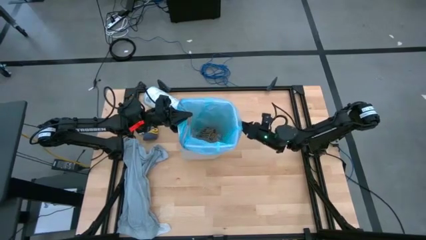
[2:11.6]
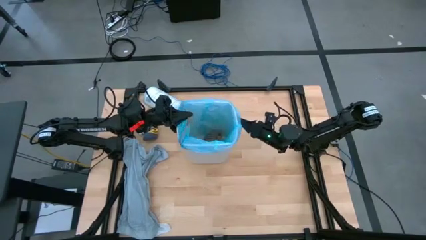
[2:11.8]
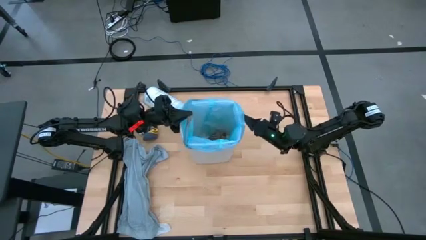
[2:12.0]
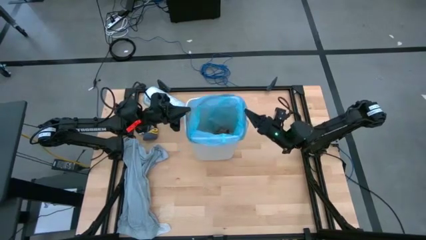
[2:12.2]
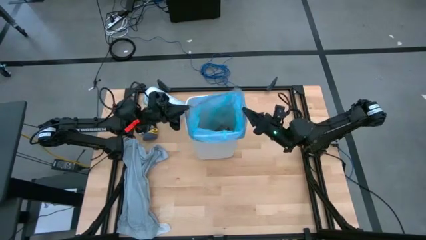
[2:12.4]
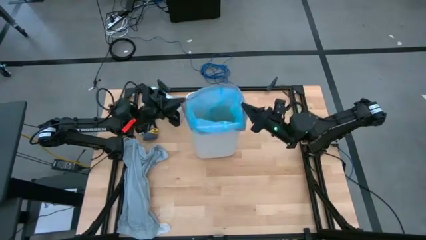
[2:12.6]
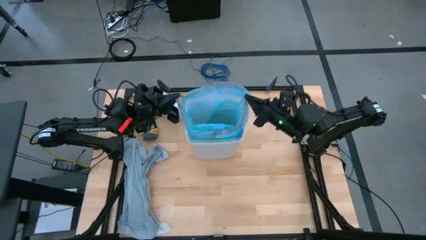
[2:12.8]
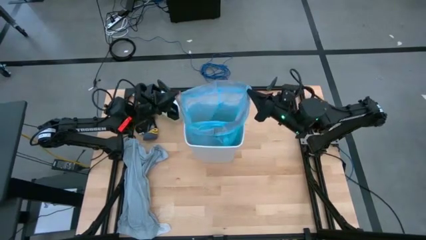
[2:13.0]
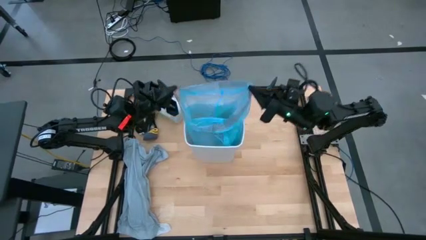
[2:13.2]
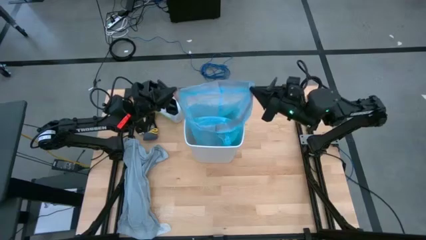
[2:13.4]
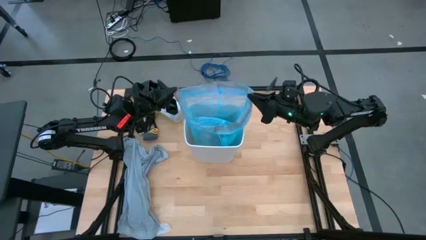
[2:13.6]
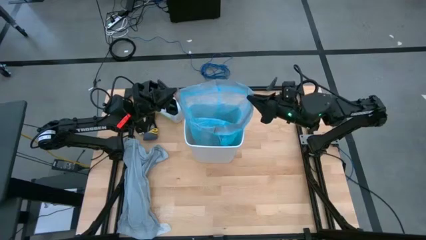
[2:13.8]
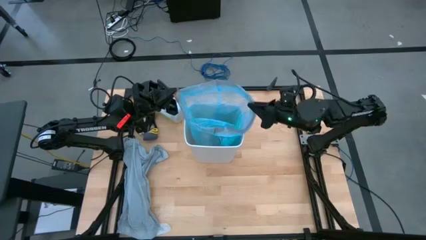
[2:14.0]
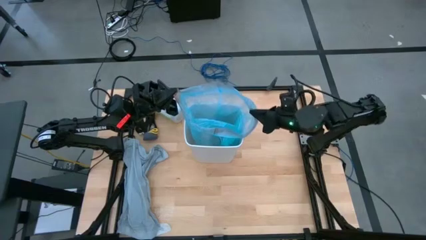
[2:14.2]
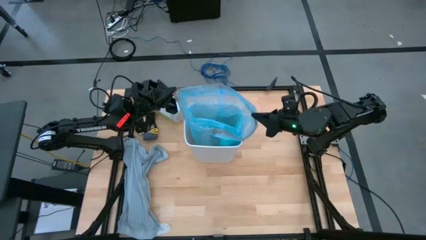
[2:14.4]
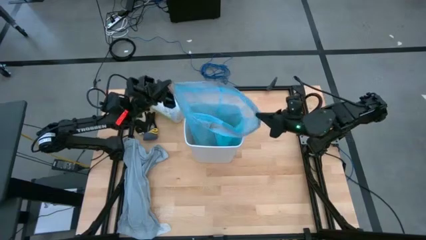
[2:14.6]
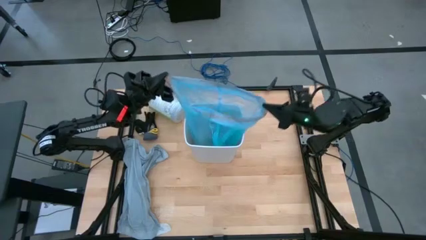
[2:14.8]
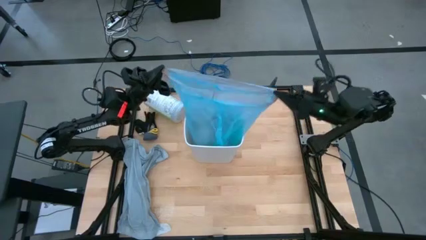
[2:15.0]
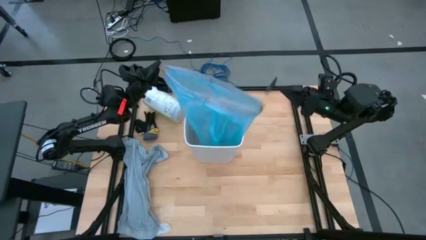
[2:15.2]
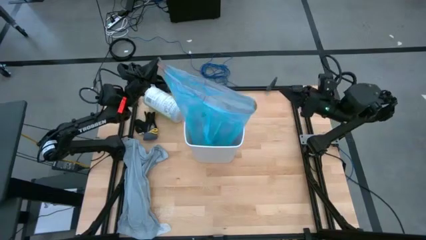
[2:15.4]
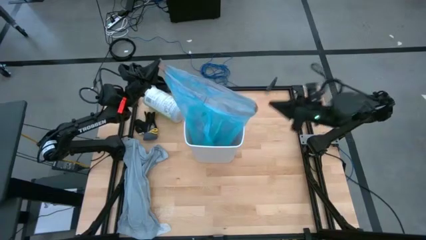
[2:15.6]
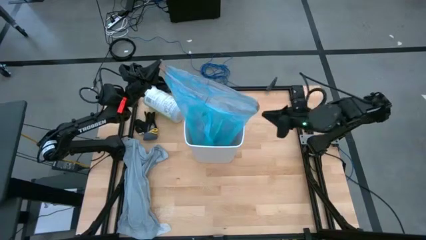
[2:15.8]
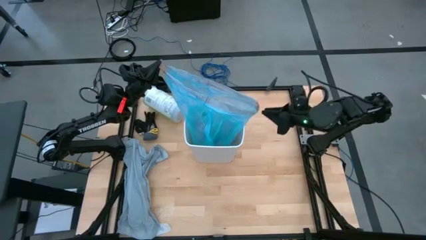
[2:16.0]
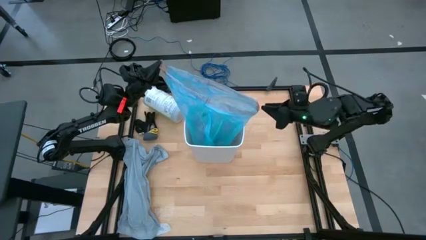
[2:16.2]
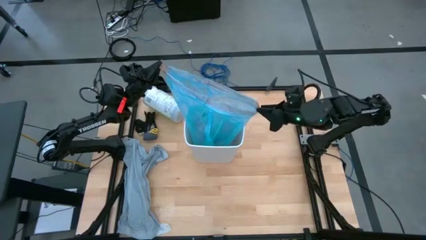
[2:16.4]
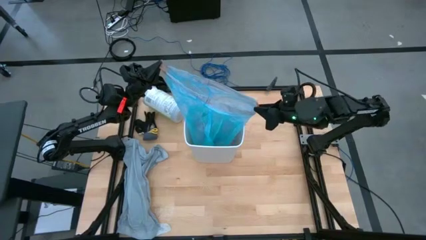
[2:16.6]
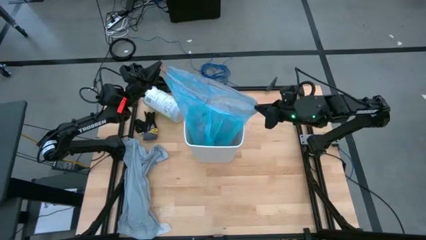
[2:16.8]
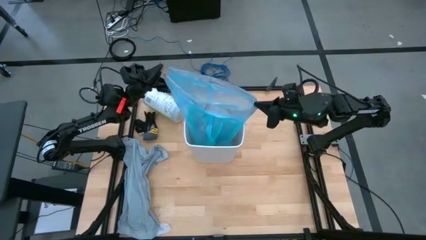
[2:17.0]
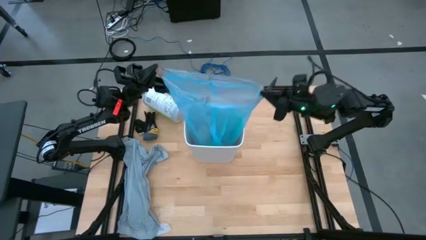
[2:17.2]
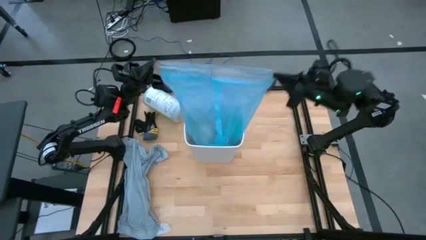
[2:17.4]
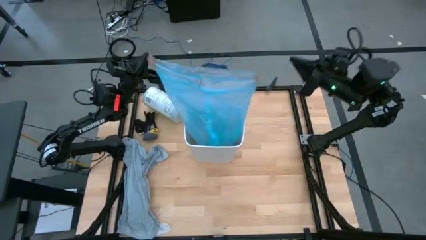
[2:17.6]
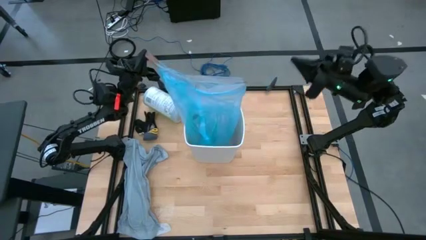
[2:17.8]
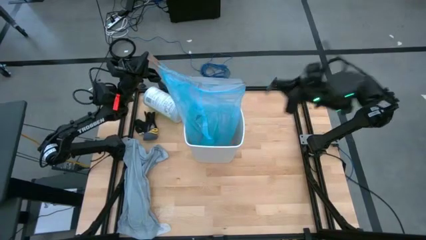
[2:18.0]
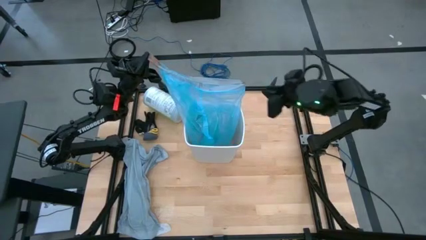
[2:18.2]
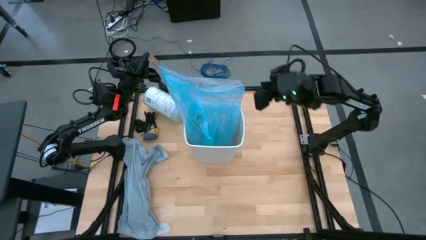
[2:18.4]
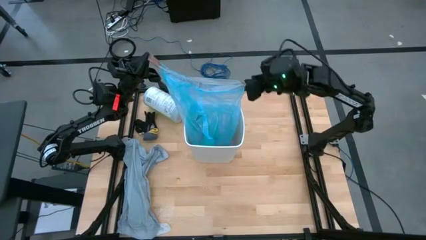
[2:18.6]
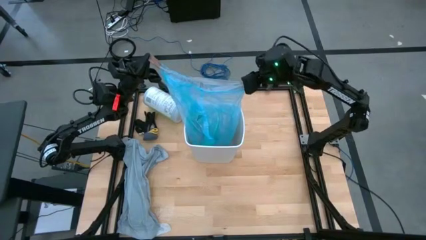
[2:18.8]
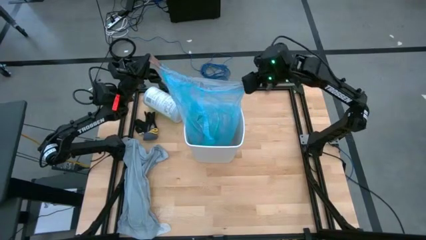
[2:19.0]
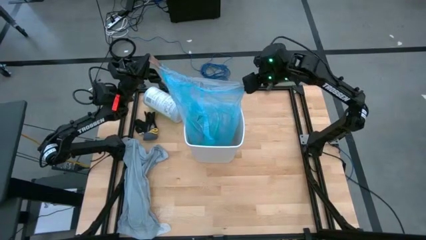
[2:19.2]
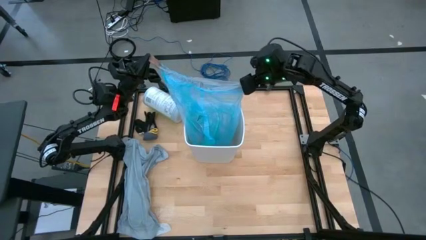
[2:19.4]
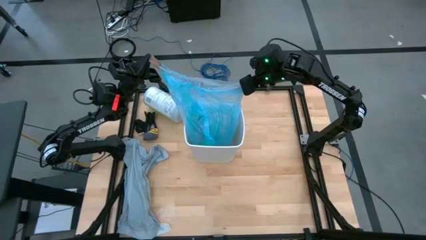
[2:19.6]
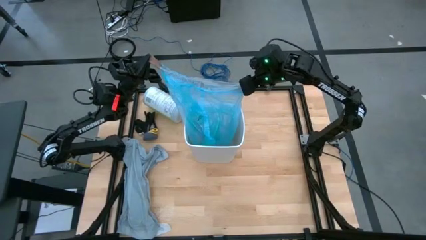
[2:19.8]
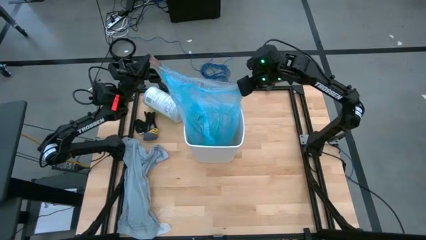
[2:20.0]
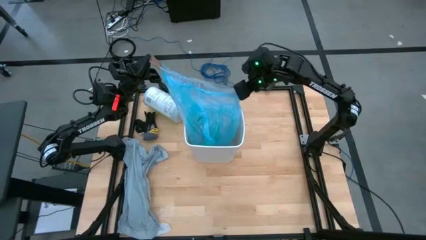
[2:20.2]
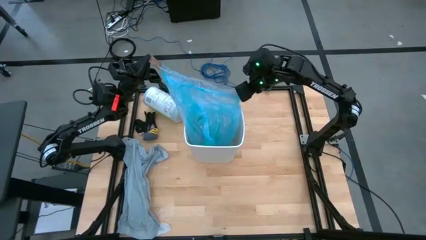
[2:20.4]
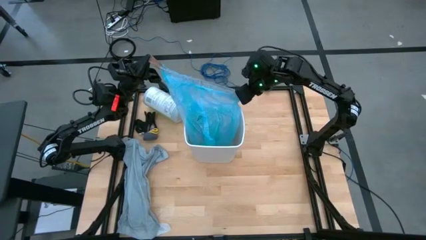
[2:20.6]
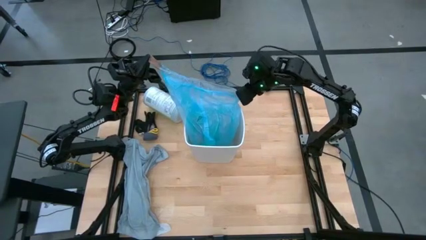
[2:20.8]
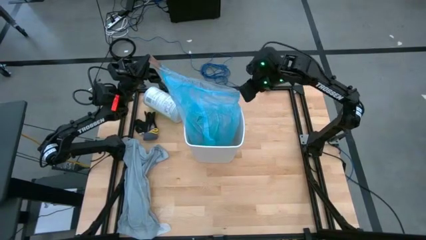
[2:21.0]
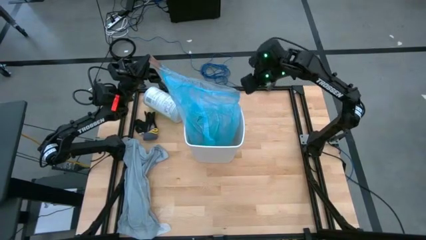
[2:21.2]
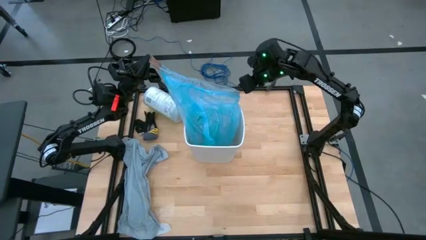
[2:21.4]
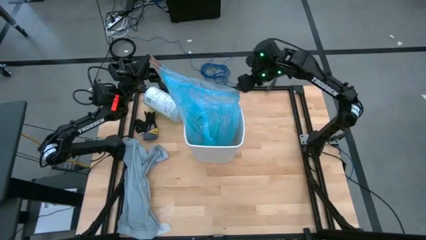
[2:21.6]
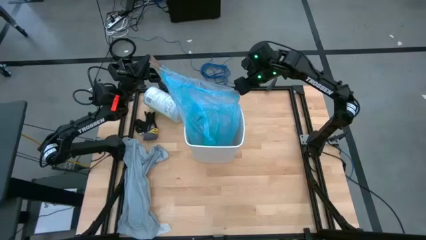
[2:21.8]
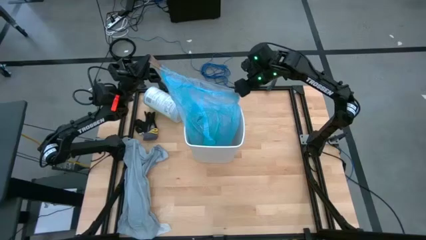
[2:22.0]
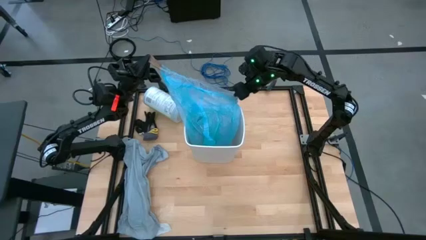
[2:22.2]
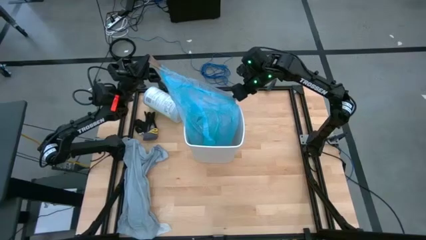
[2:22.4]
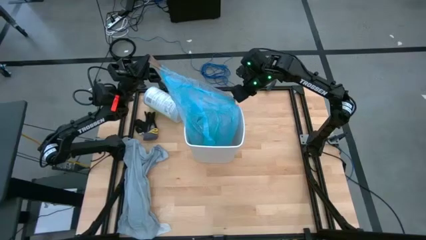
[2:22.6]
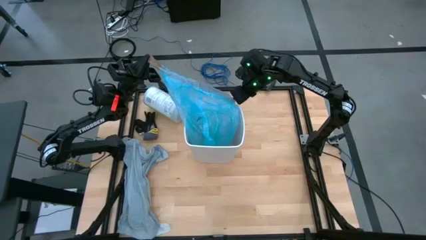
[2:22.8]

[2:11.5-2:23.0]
Task: place trash/remove bag and relplace
Remove the blue trash bag from the trash bin

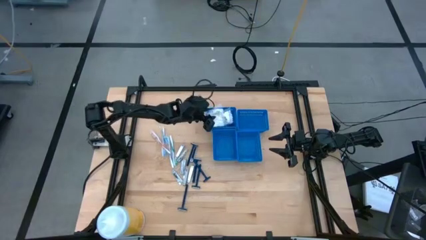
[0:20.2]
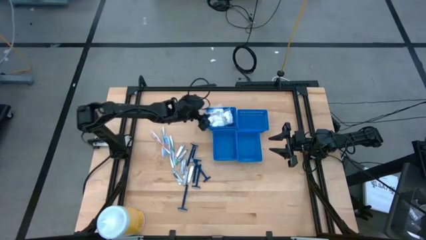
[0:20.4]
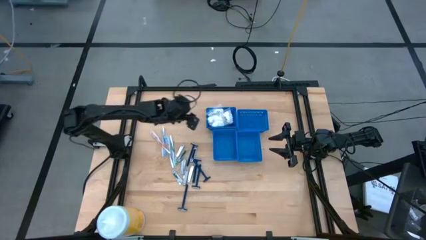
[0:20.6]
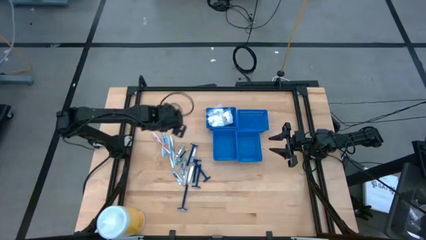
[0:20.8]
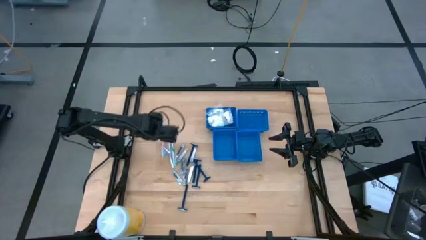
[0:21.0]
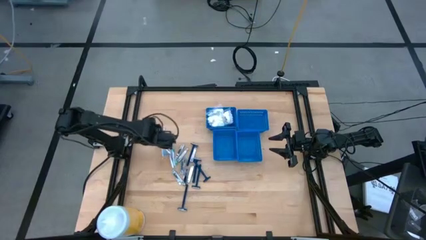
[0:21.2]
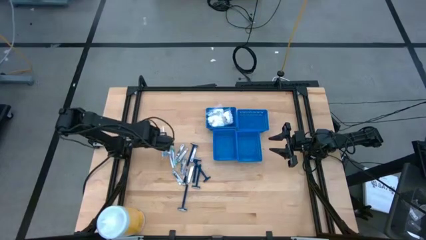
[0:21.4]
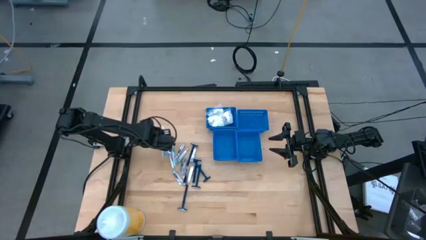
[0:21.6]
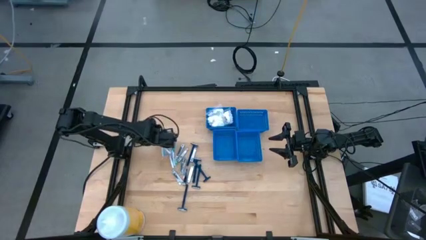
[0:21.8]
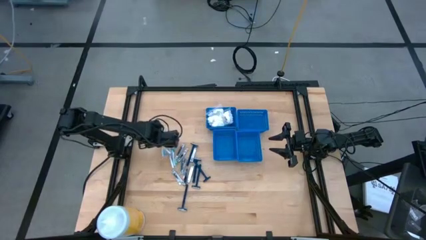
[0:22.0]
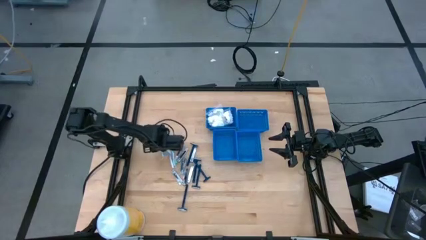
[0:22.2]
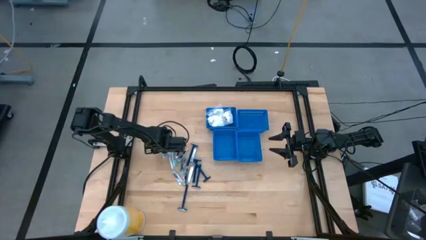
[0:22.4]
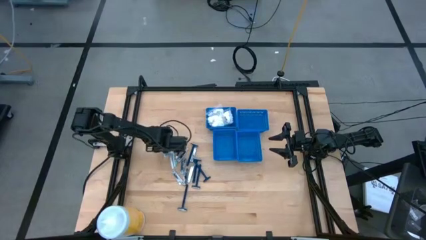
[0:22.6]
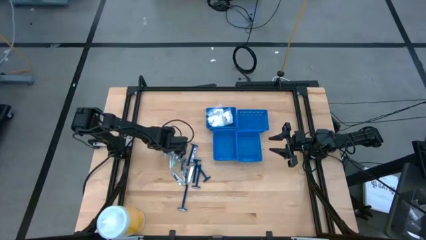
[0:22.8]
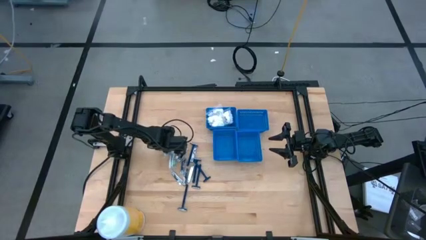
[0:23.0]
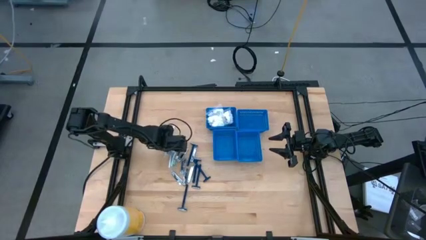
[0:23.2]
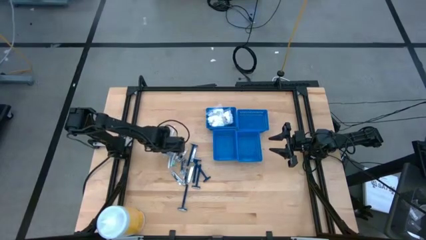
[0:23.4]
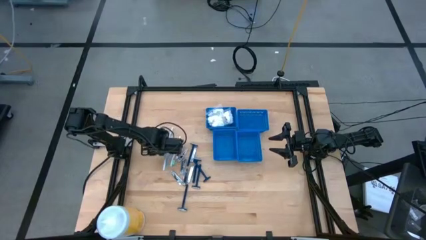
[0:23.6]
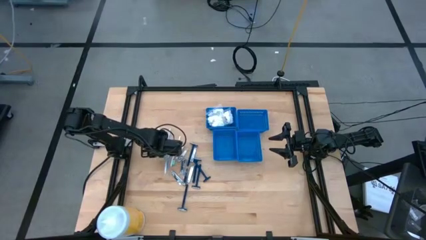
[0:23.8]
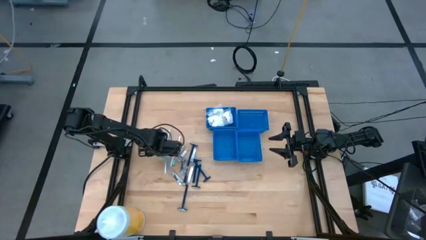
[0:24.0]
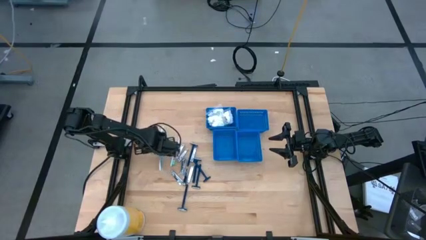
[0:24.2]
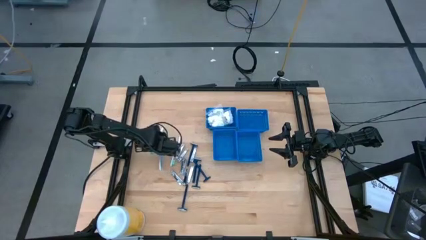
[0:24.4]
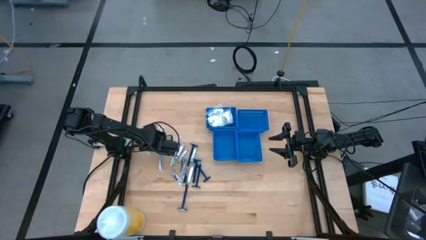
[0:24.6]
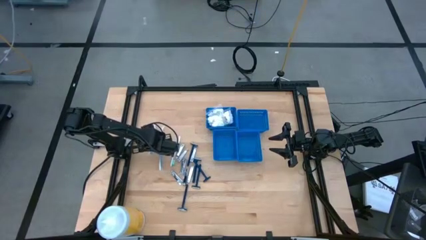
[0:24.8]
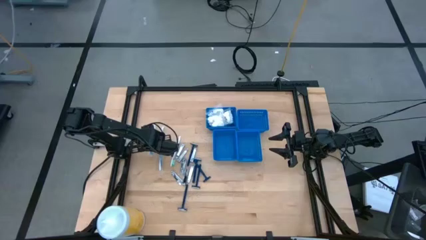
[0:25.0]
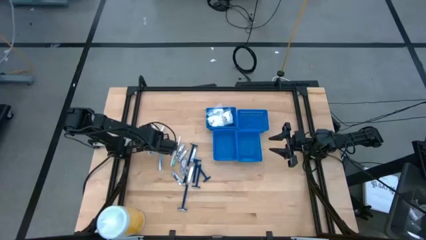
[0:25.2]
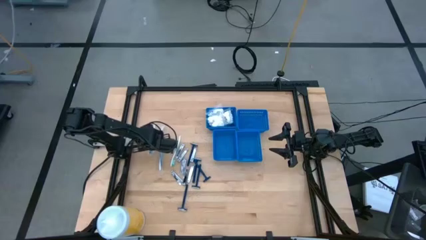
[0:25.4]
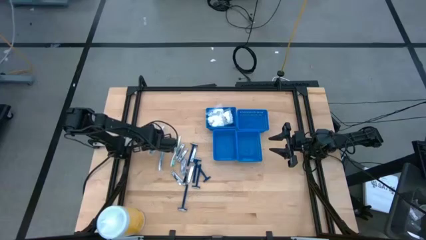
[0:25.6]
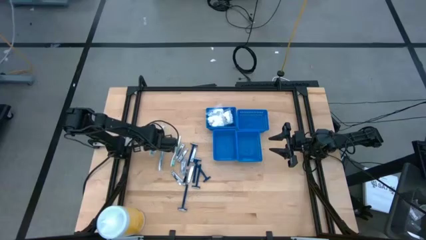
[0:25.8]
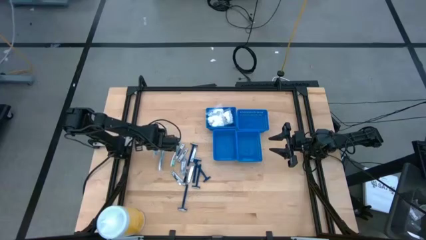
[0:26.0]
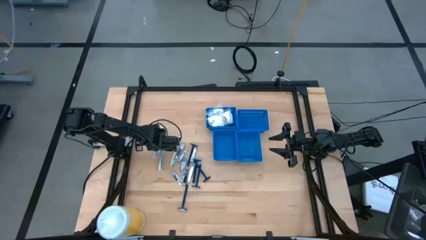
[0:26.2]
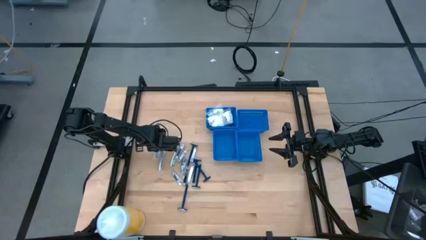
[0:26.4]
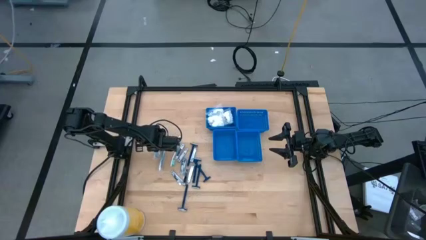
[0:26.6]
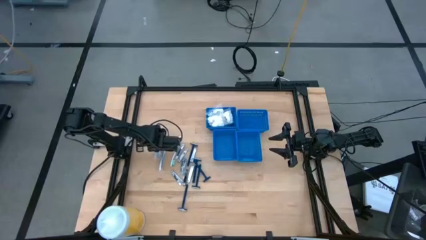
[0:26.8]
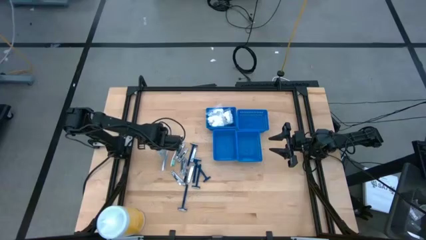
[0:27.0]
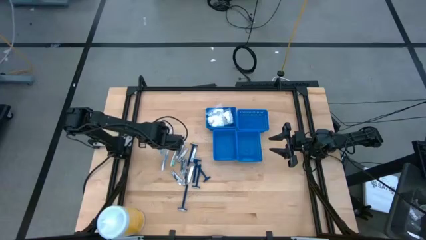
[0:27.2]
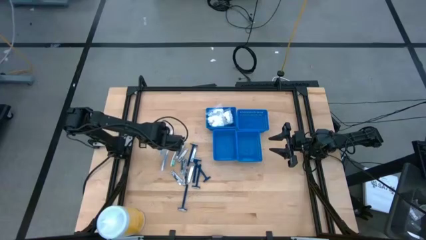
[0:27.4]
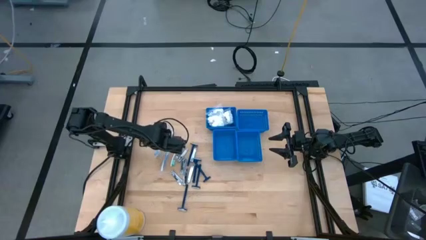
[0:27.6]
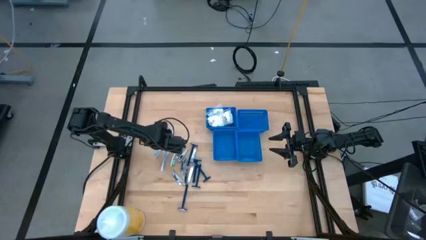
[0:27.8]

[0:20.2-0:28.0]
Task: Pick & Place Travel size toiletries
Put the orange toothbrush into the top right blue basket
